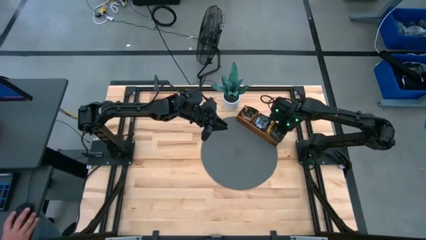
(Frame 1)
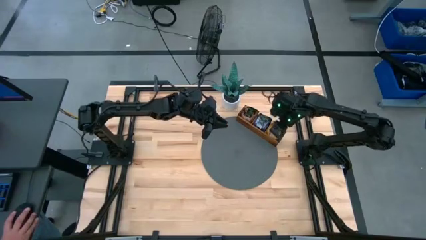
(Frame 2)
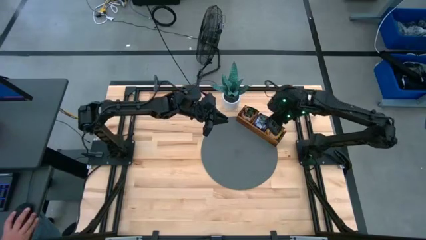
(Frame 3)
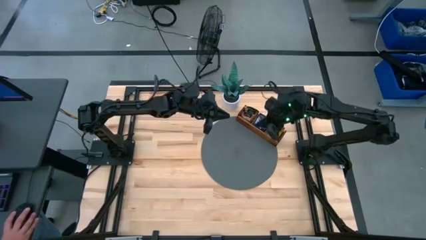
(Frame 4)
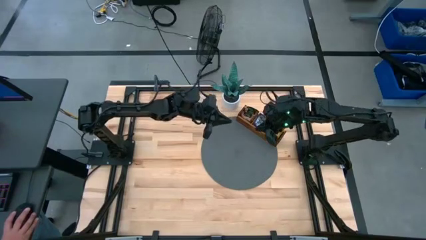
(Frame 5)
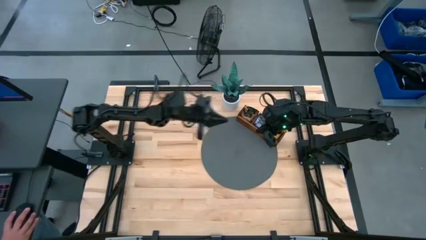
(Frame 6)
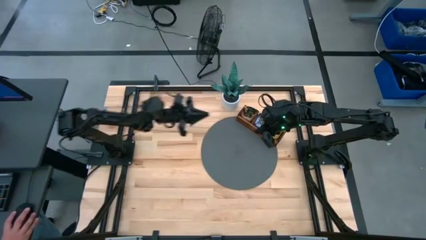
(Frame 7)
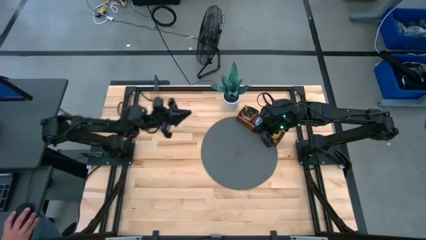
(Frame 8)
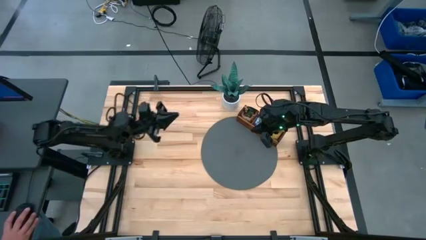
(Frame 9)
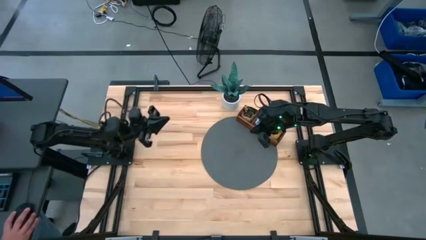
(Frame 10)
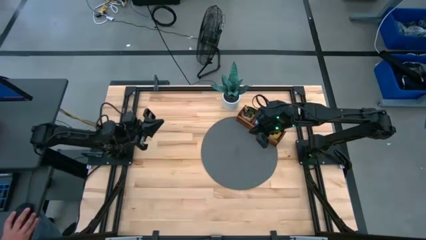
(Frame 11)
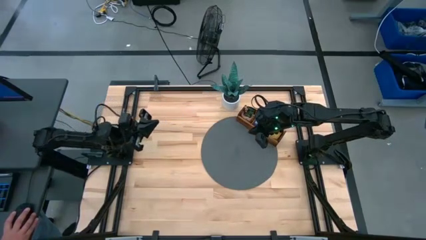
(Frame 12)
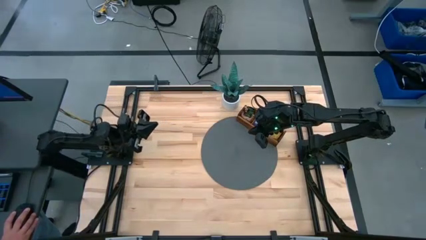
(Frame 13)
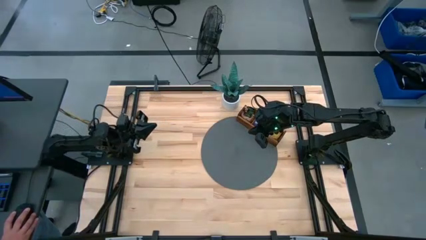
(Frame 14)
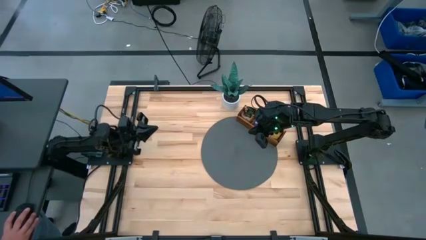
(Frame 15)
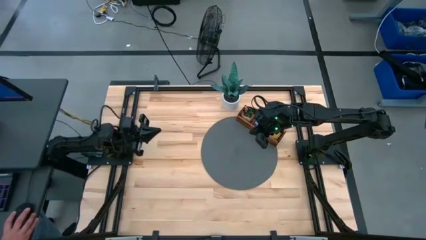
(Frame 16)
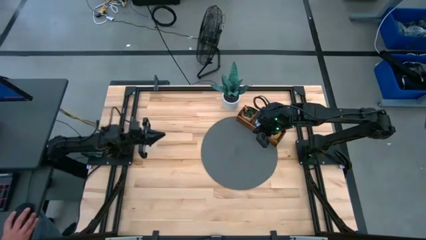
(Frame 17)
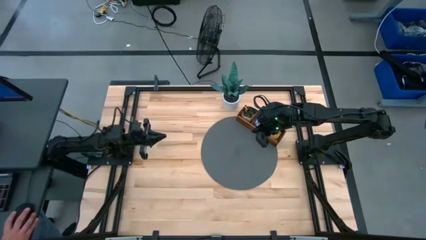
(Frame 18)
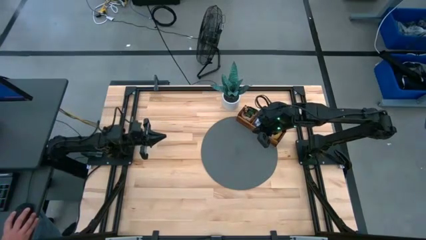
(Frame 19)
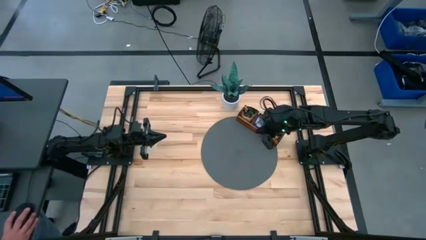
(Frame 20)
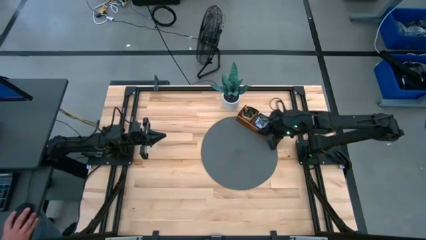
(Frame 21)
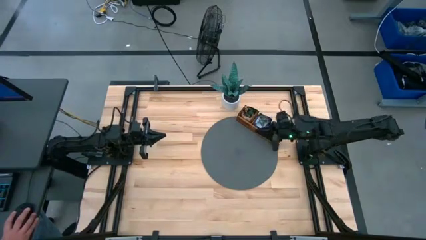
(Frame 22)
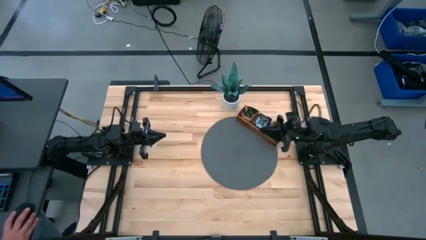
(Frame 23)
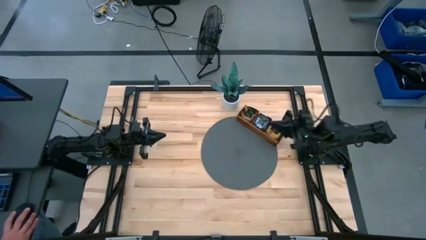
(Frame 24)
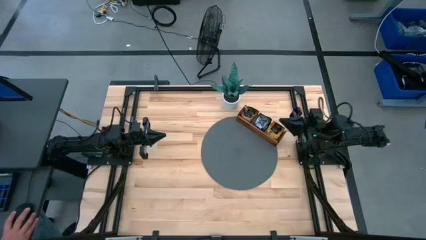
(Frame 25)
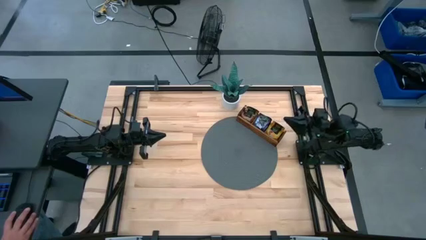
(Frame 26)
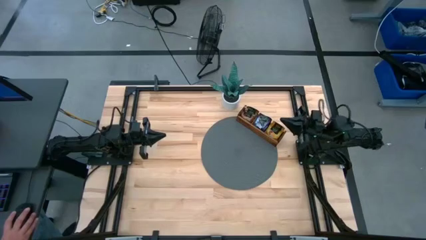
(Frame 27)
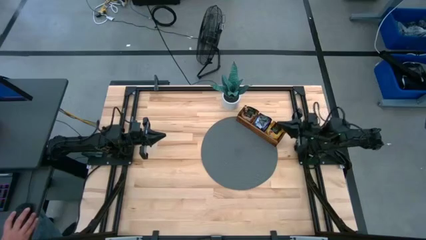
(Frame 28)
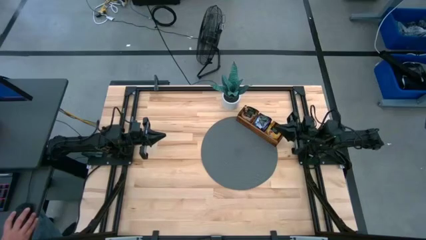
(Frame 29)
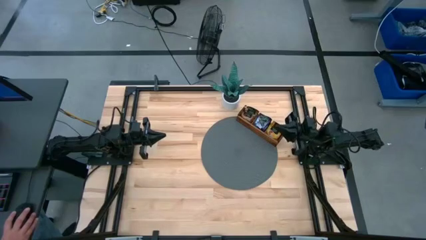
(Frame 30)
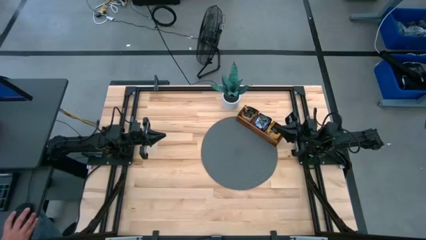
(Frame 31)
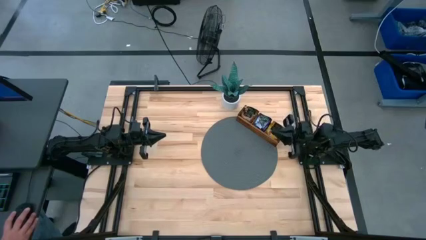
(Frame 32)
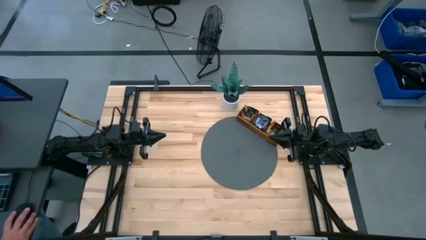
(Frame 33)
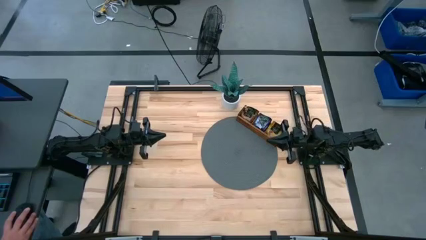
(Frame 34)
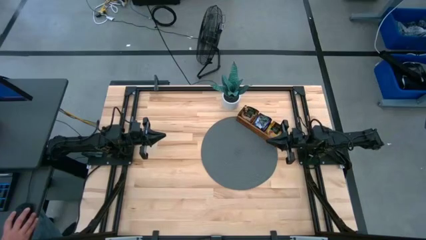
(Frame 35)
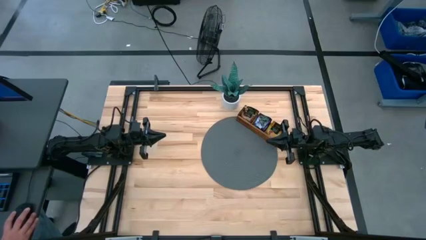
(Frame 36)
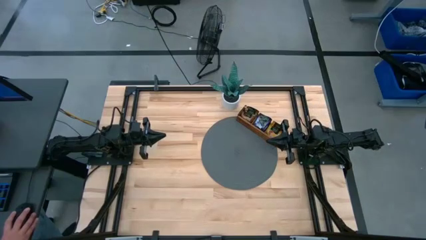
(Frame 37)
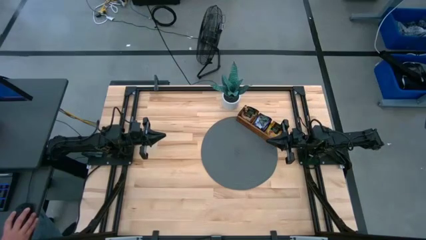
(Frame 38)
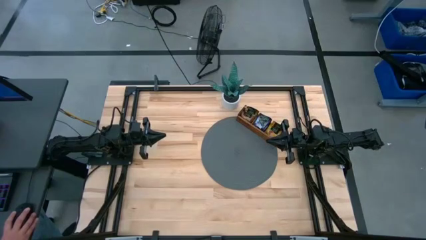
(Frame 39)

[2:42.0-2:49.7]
Task: Pick & Place Tea
Return to Home Position
